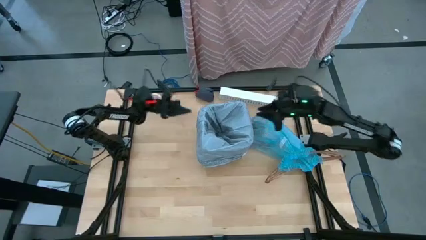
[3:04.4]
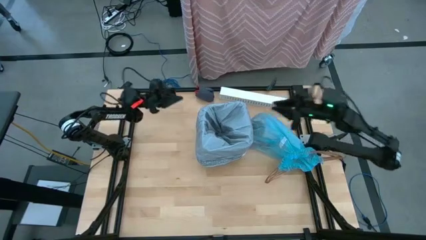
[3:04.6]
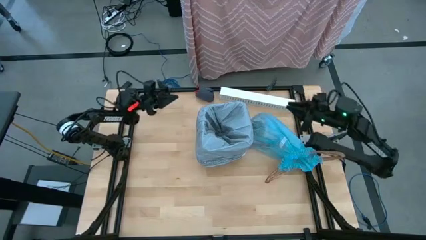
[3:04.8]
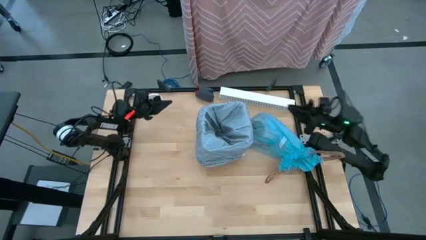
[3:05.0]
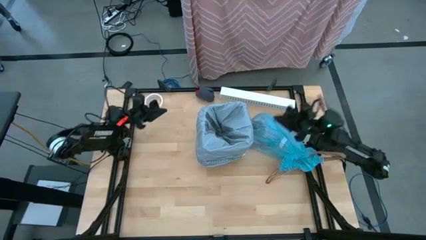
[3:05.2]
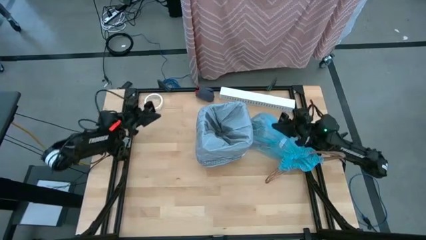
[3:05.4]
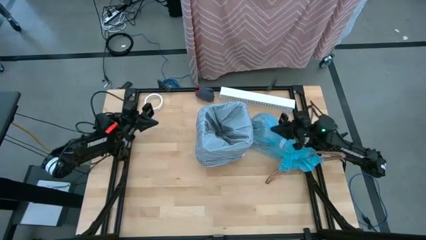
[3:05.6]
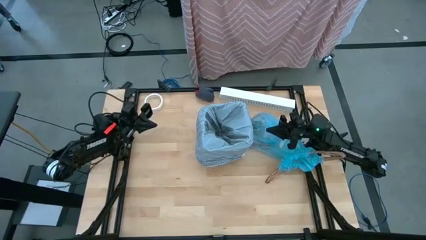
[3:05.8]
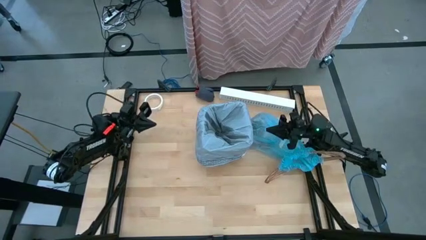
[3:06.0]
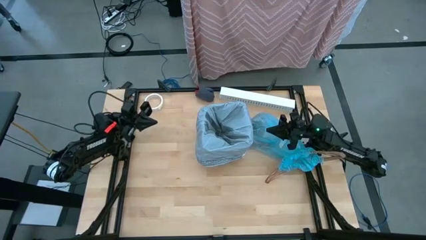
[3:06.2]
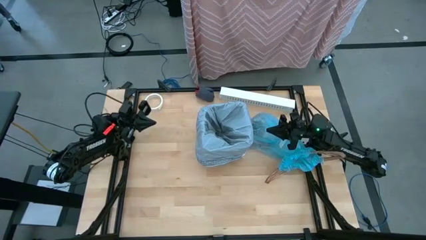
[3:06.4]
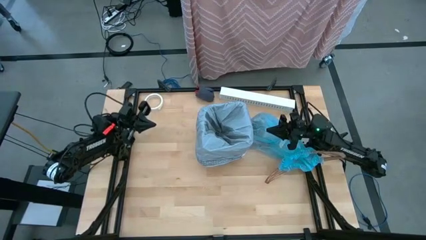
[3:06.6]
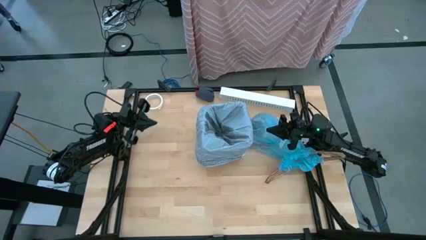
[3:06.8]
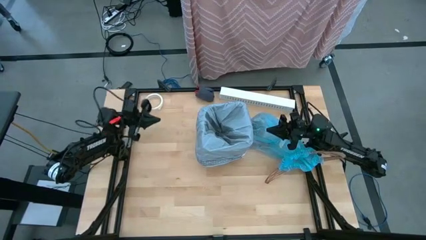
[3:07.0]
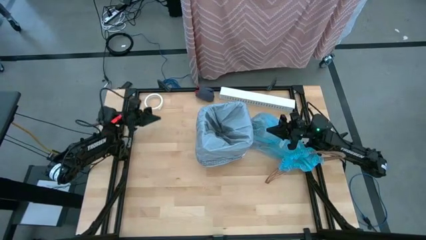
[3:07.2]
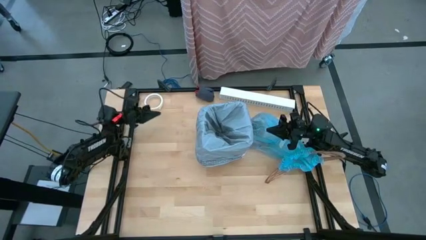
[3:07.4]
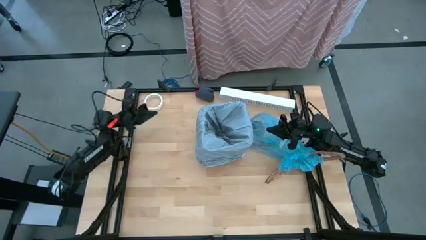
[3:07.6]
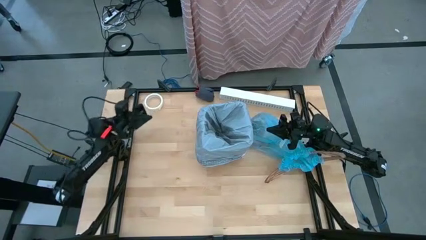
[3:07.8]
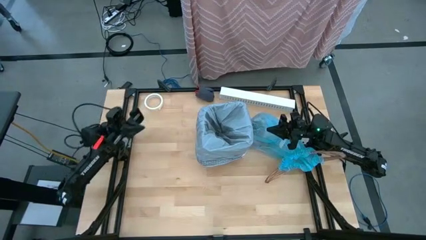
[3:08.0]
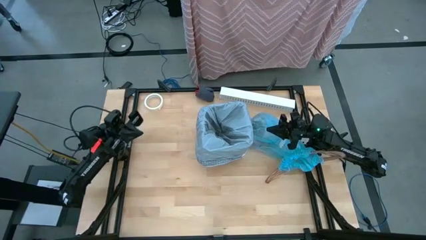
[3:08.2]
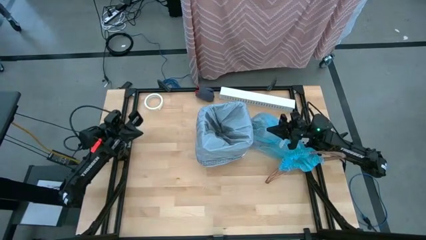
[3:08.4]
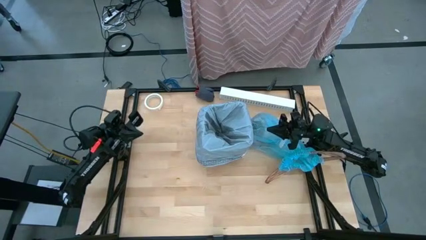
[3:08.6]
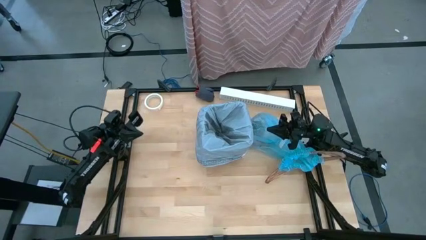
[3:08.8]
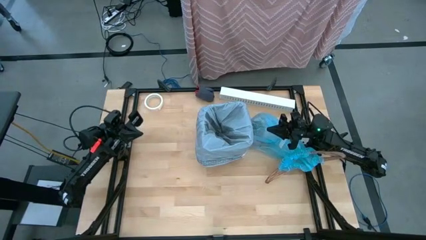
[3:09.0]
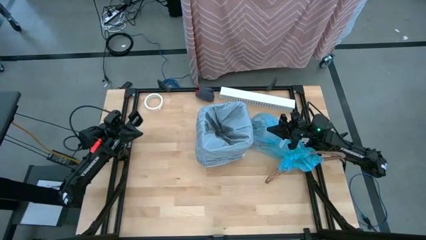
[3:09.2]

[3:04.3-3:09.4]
Task: place trash/remove bag and relplace
Return to Home Position

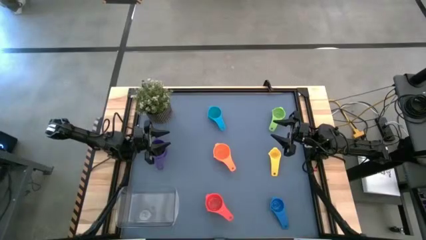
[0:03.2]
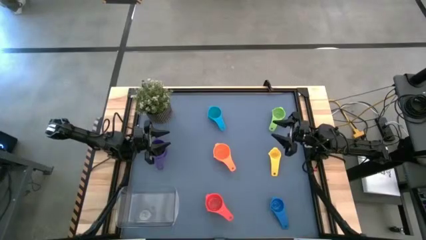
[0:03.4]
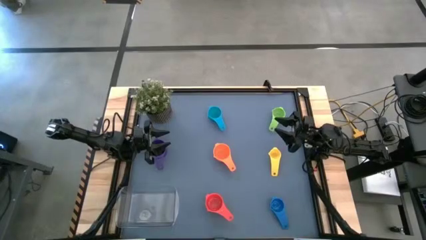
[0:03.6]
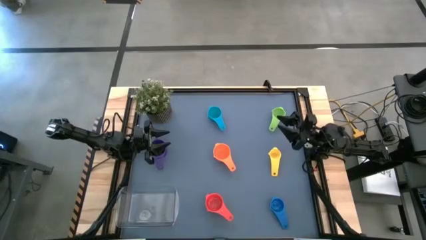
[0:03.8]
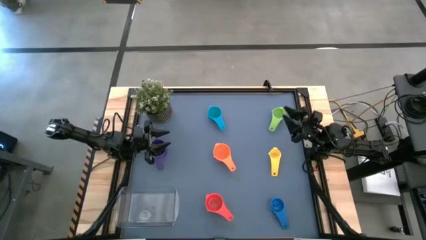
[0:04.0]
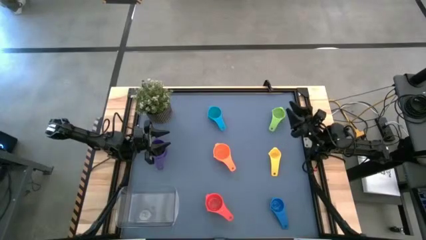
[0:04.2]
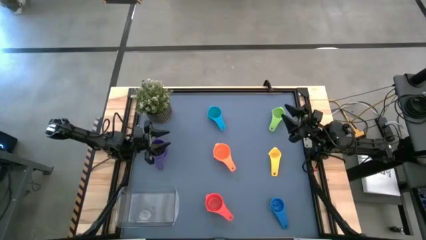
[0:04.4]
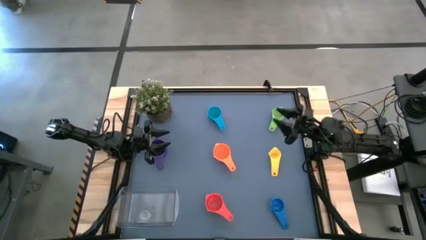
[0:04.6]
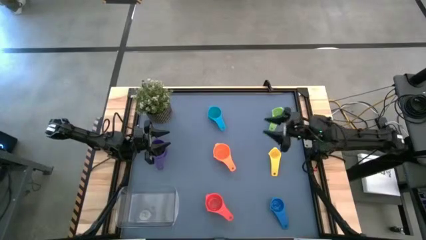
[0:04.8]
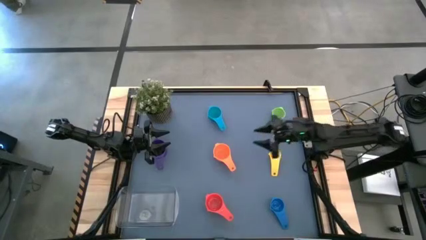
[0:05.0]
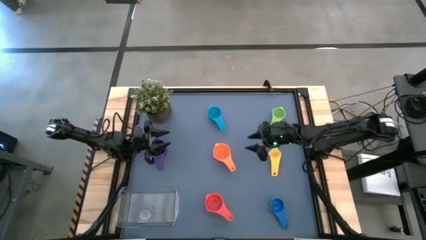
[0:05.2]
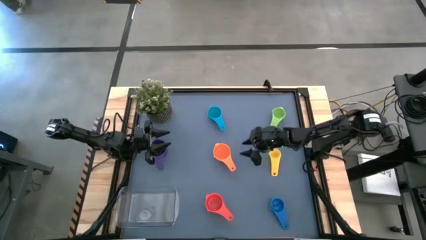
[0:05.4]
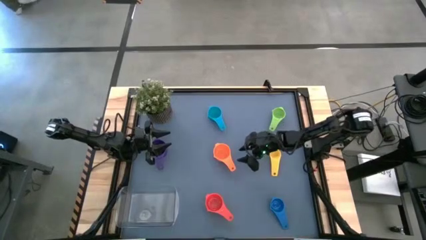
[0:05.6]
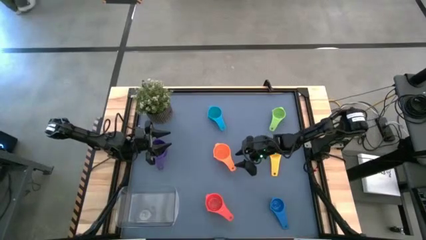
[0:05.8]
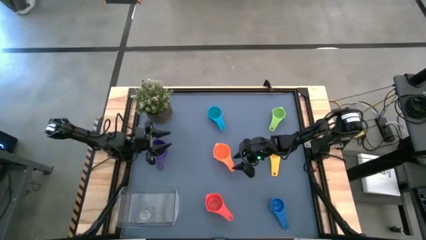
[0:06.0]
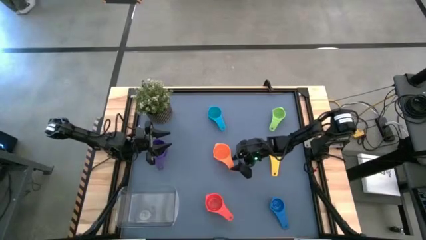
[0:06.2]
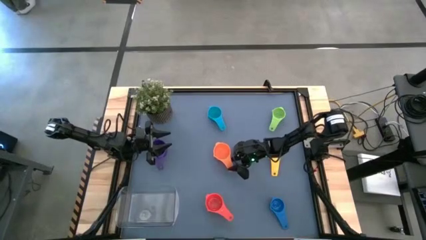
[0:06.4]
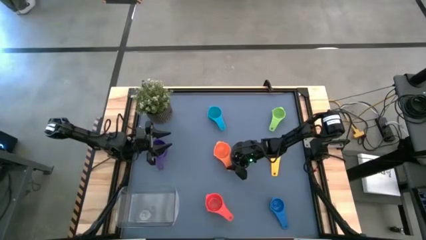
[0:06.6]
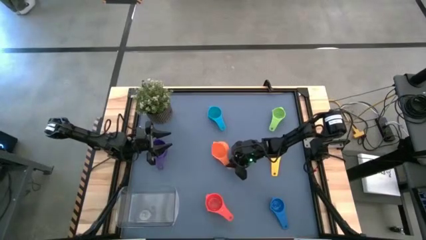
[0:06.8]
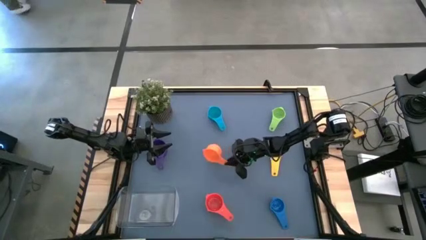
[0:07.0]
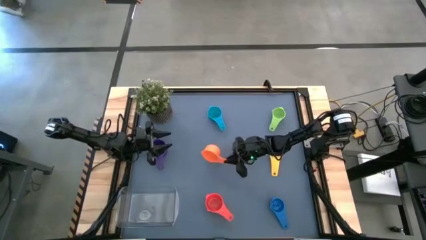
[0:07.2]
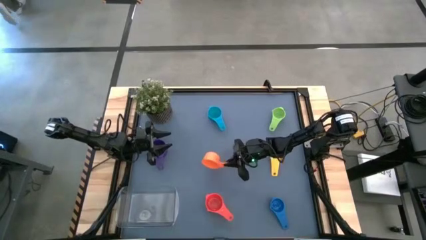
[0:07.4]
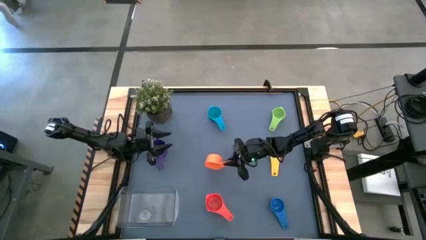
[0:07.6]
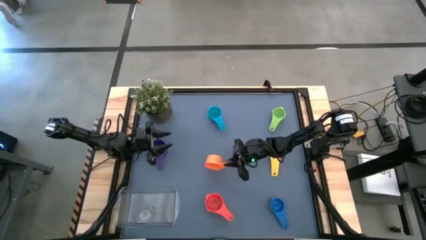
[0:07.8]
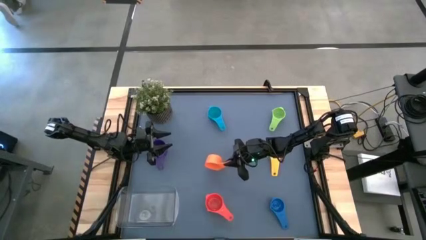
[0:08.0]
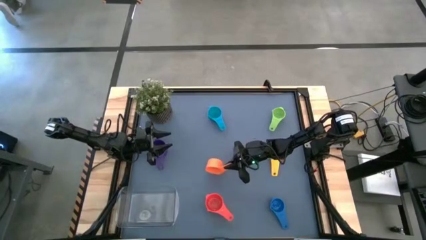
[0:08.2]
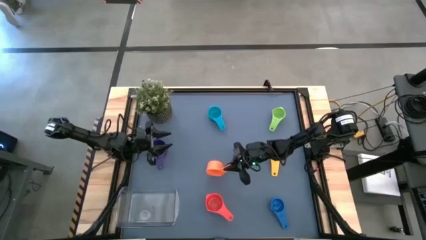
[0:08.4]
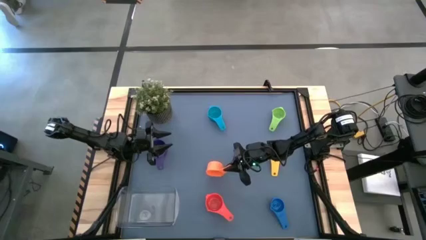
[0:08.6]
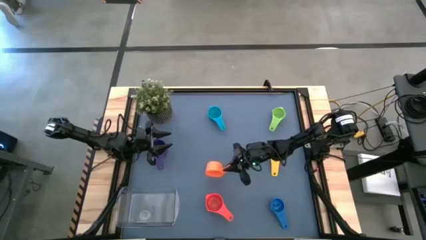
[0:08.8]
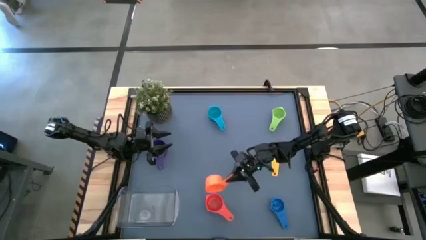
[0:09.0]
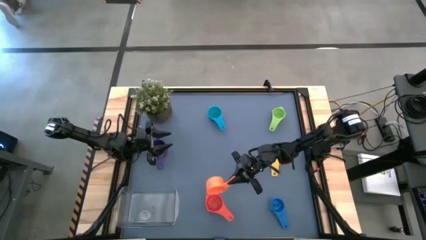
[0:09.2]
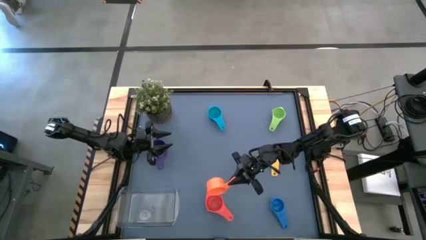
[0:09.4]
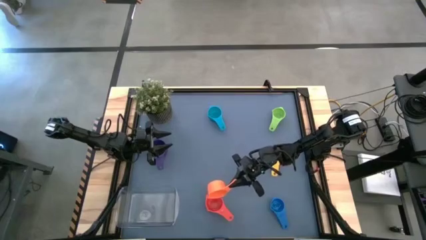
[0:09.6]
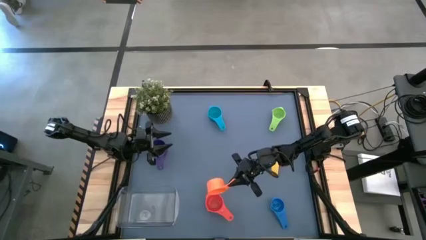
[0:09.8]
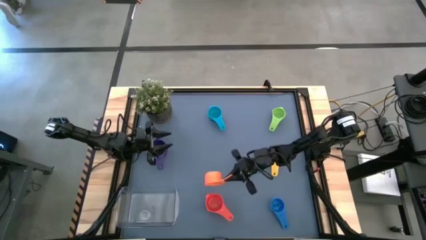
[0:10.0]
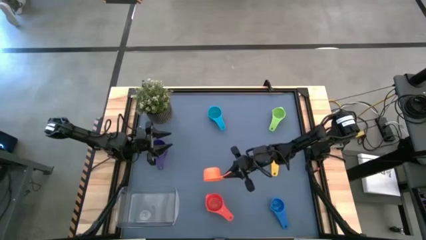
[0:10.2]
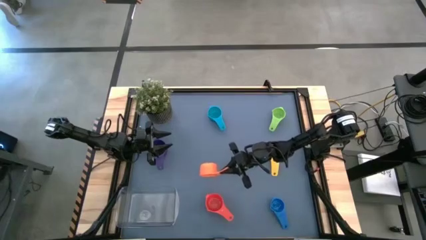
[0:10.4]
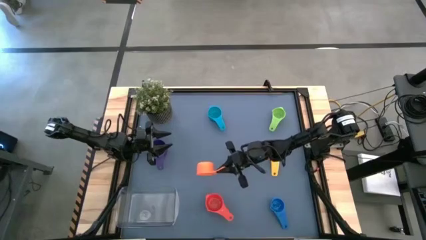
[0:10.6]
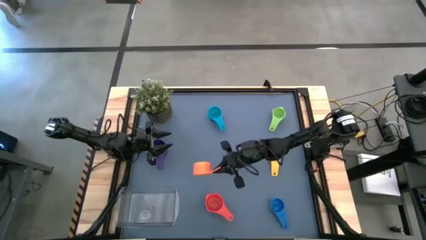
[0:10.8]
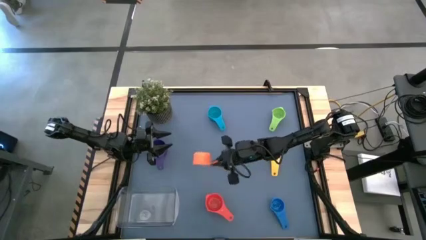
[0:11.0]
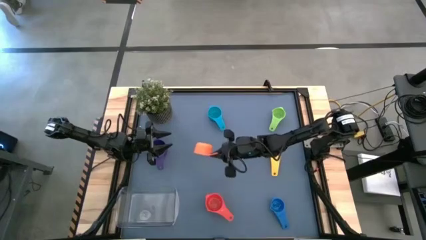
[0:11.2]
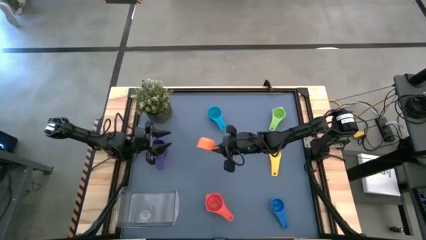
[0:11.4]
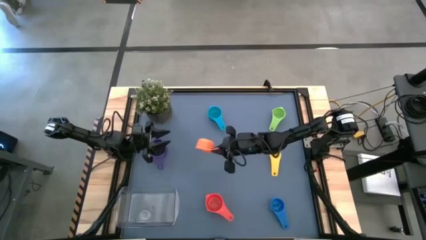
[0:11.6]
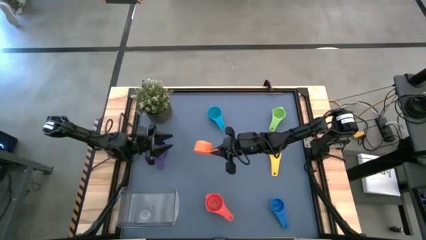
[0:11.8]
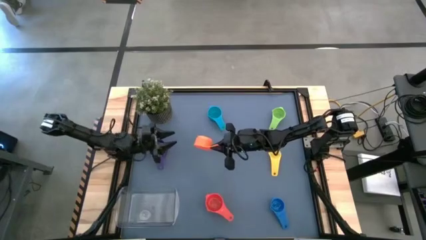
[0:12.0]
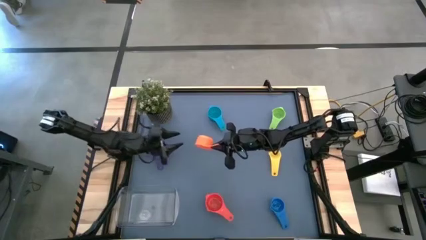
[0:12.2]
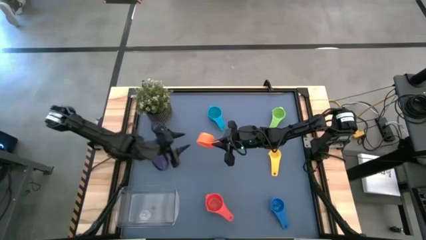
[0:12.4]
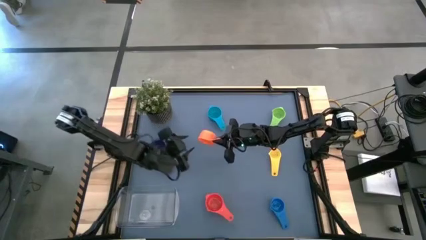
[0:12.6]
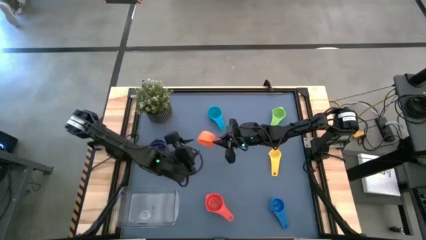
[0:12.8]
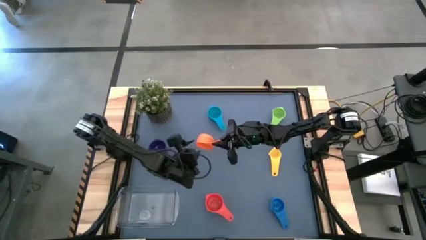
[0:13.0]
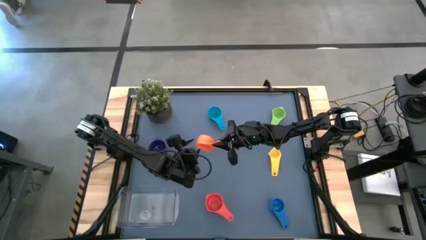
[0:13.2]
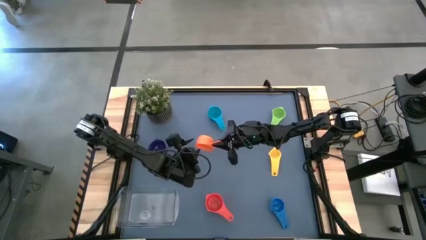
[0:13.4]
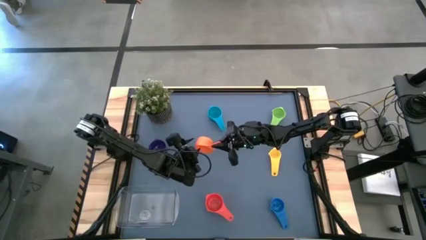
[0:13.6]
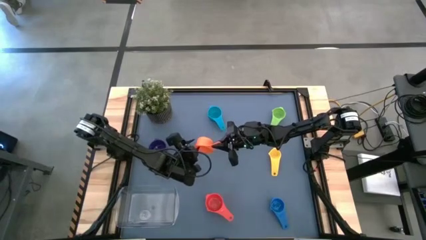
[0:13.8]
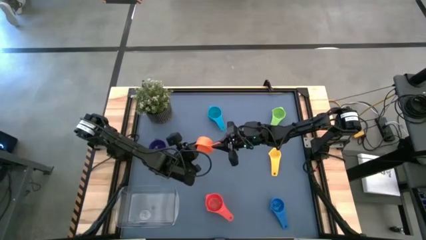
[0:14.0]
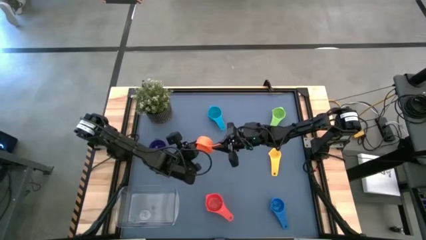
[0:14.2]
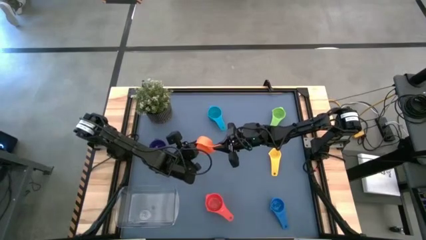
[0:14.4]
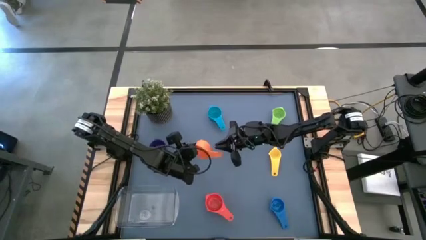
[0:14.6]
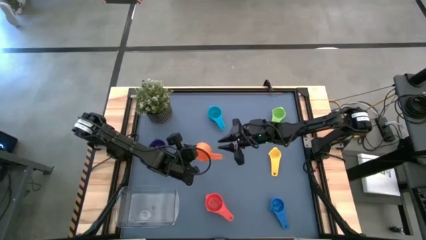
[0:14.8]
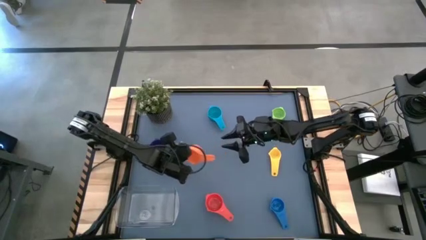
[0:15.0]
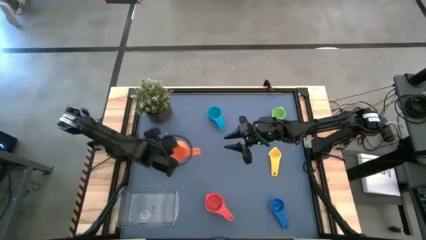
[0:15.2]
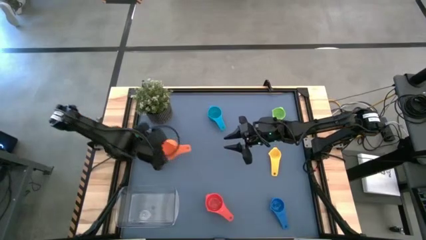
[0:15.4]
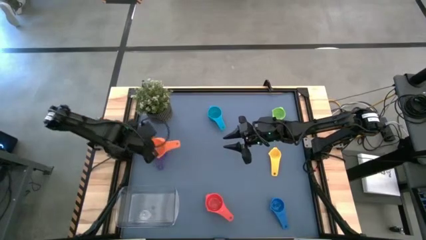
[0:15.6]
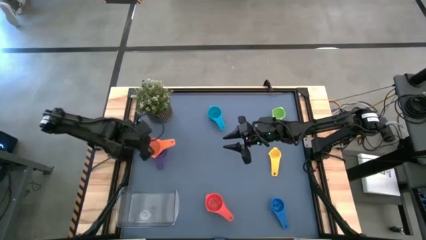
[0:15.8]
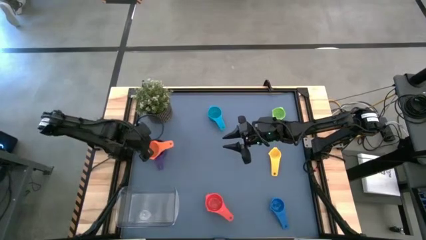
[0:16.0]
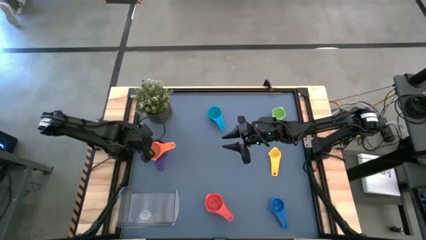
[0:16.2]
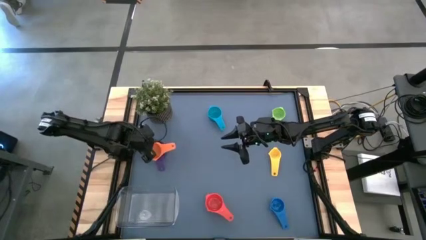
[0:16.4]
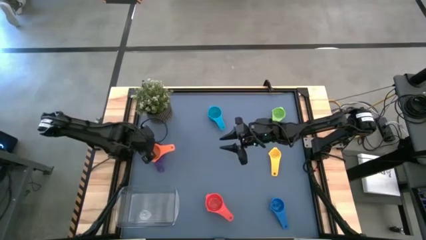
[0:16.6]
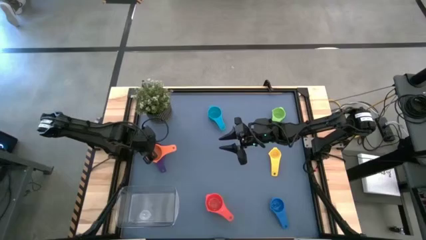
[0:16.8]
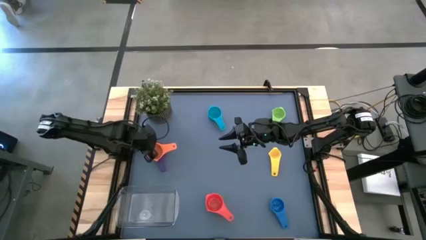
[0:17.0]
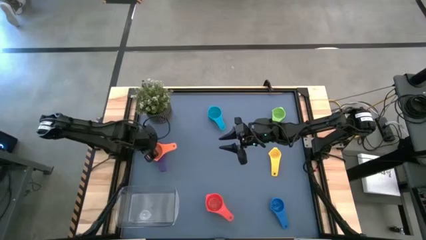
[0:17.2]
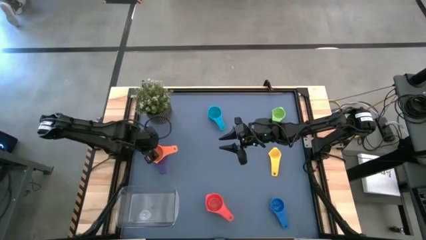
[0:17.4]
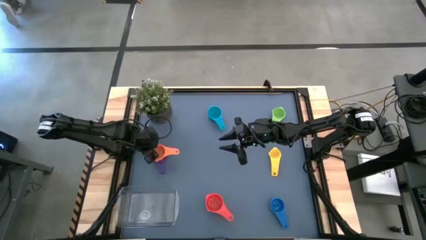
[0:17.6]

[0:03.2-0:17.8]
Task: Nest measuring cups in basket
Stack the orange measuring cup on top of the violet measuring cup
